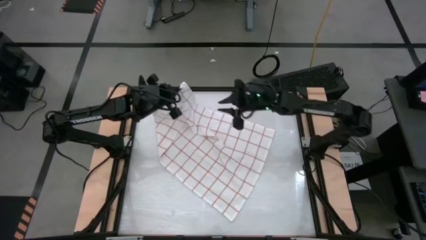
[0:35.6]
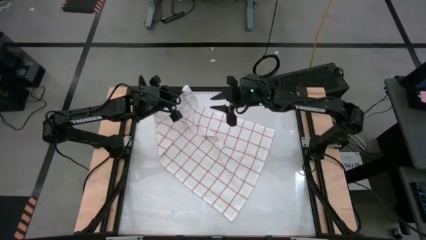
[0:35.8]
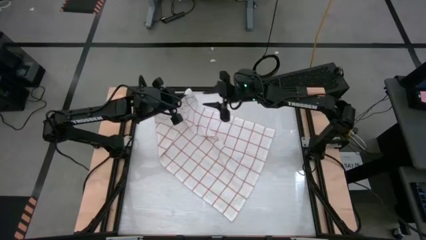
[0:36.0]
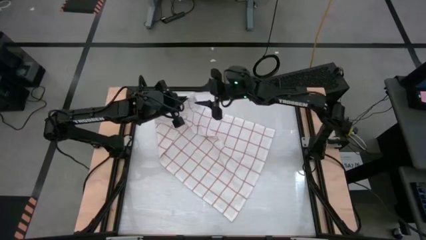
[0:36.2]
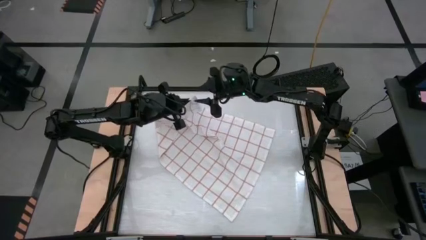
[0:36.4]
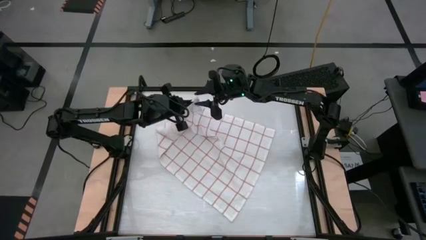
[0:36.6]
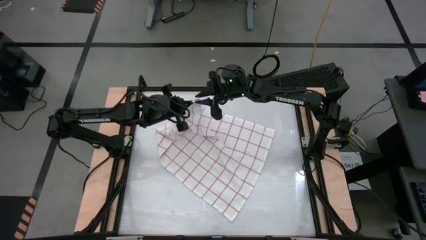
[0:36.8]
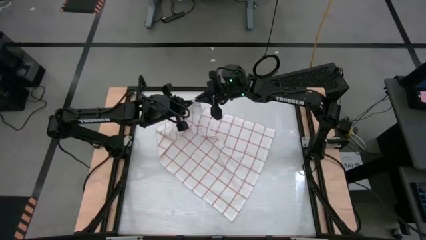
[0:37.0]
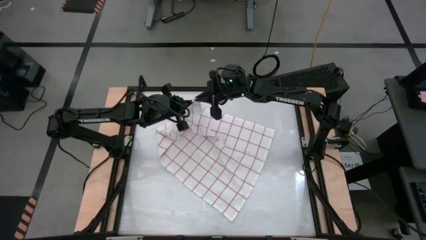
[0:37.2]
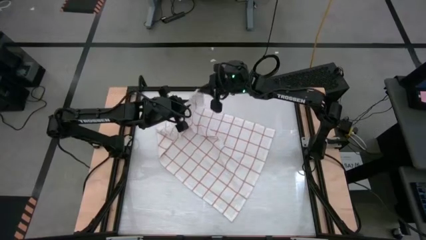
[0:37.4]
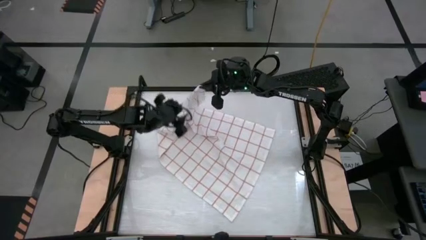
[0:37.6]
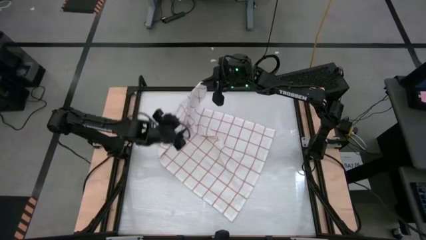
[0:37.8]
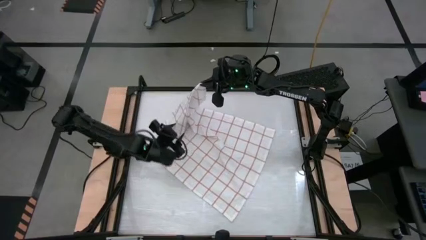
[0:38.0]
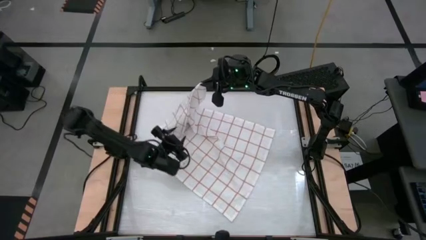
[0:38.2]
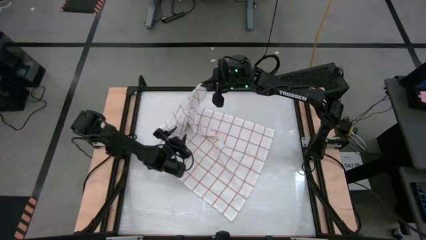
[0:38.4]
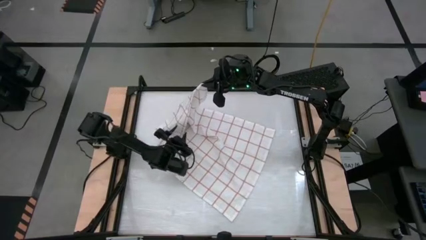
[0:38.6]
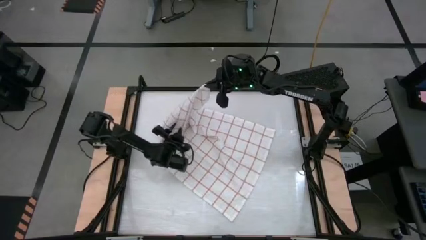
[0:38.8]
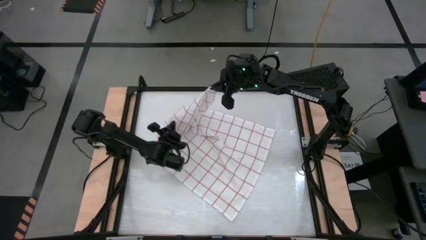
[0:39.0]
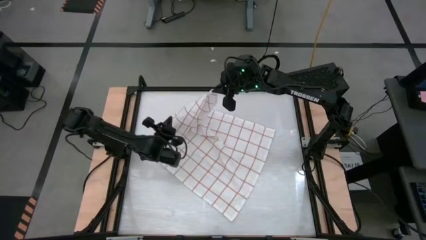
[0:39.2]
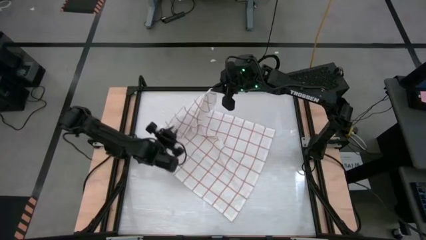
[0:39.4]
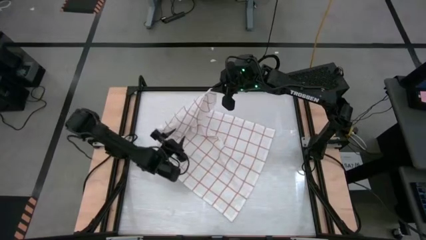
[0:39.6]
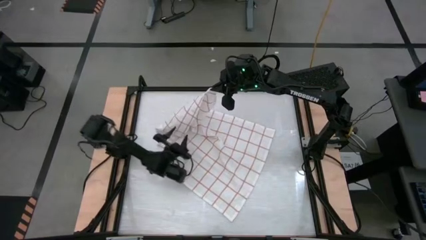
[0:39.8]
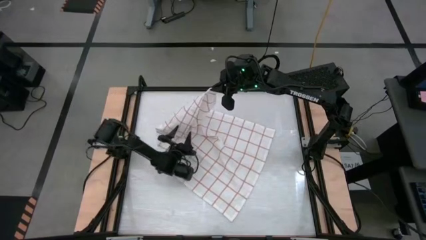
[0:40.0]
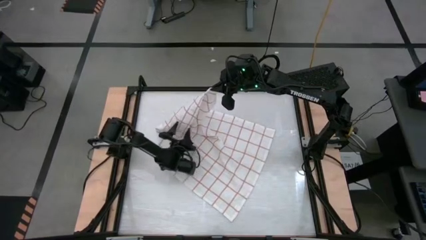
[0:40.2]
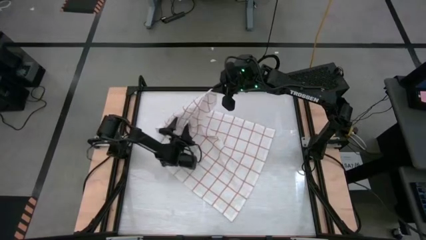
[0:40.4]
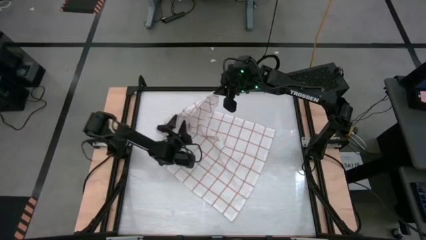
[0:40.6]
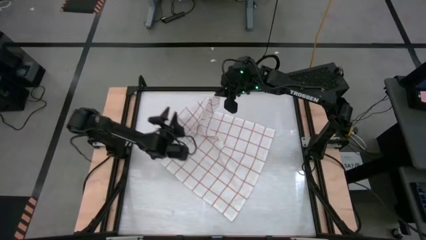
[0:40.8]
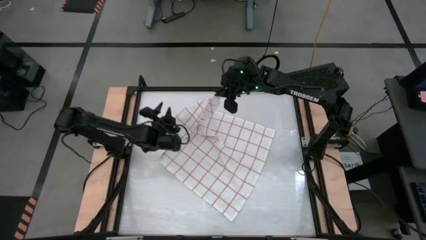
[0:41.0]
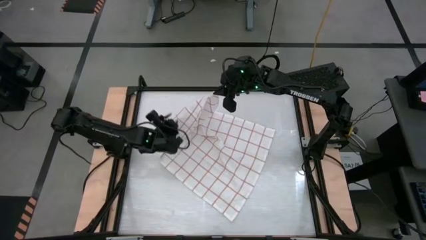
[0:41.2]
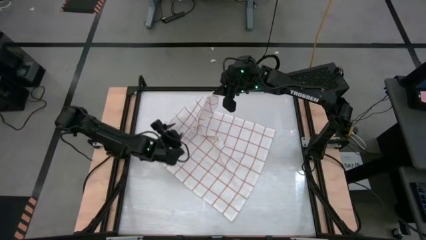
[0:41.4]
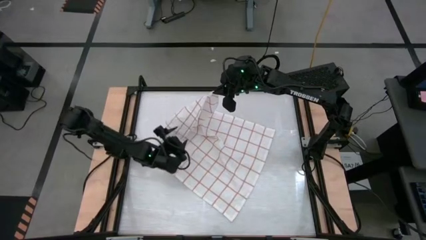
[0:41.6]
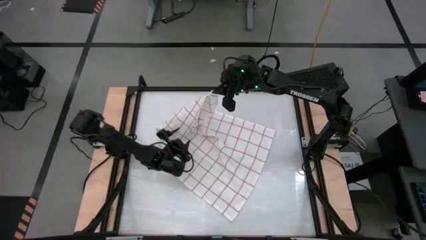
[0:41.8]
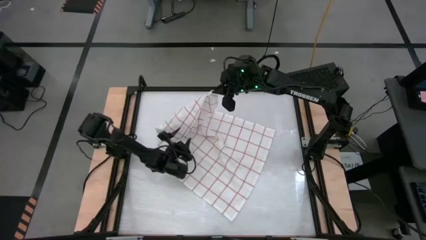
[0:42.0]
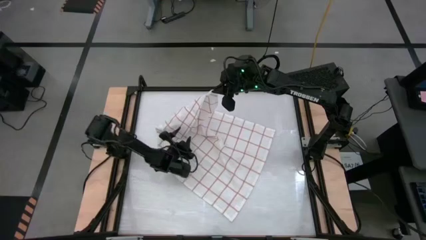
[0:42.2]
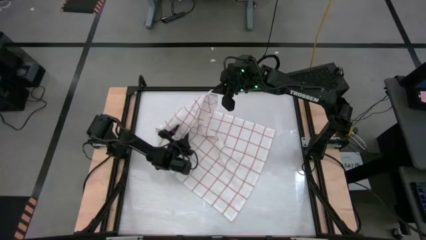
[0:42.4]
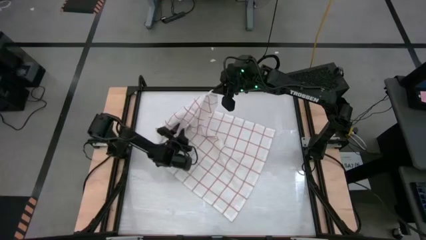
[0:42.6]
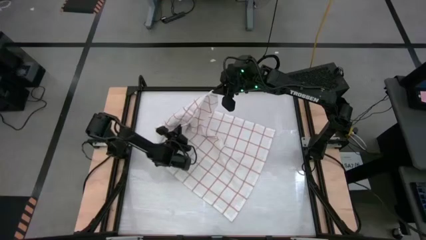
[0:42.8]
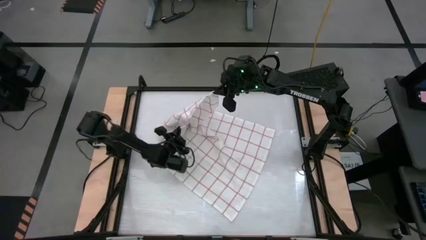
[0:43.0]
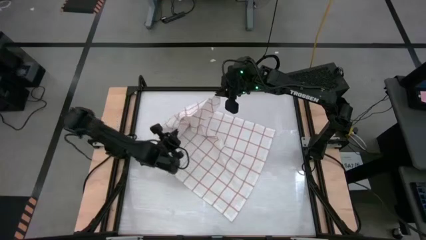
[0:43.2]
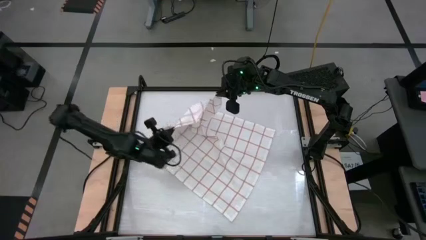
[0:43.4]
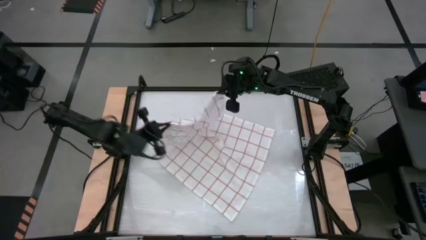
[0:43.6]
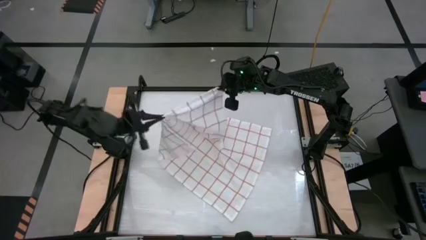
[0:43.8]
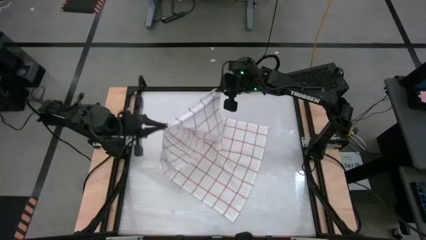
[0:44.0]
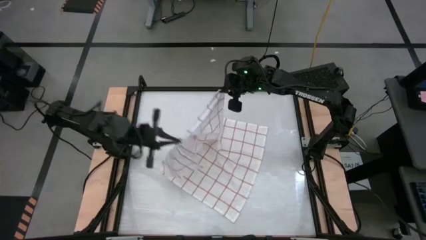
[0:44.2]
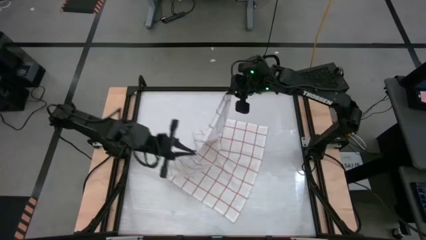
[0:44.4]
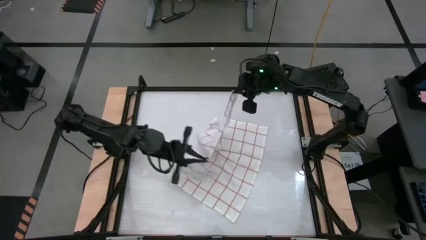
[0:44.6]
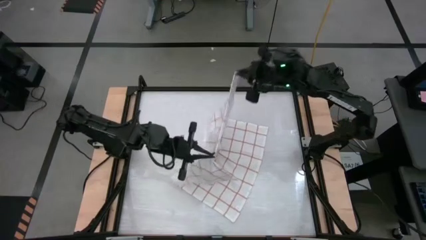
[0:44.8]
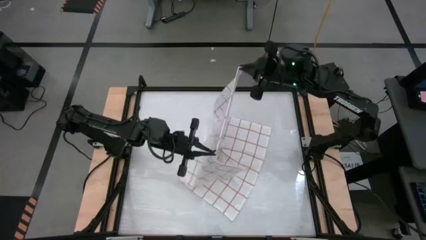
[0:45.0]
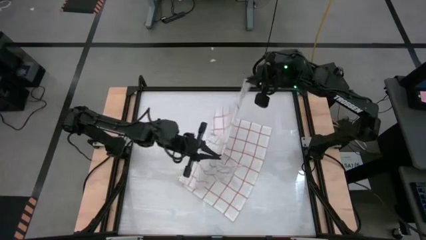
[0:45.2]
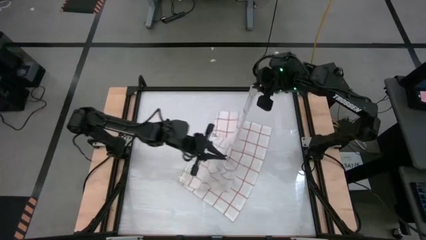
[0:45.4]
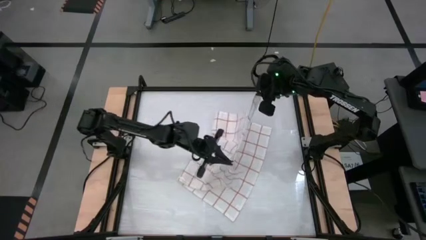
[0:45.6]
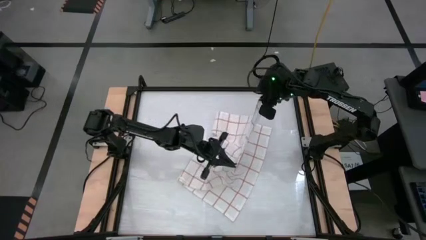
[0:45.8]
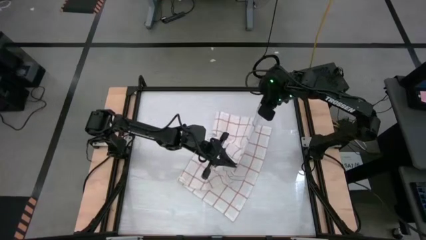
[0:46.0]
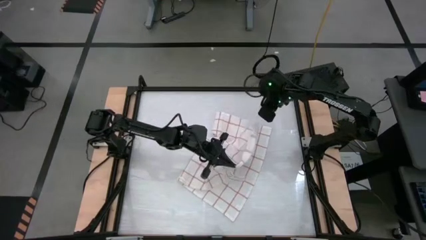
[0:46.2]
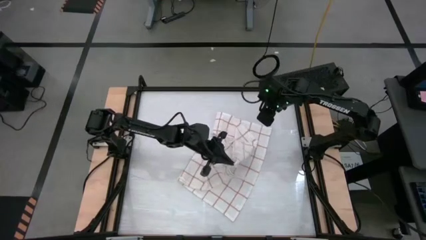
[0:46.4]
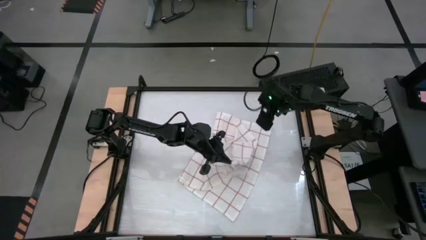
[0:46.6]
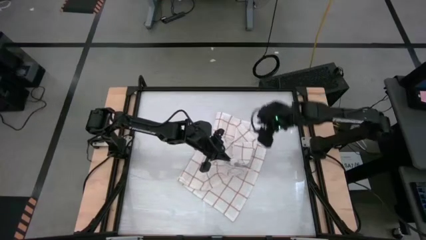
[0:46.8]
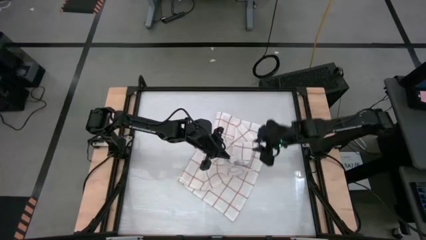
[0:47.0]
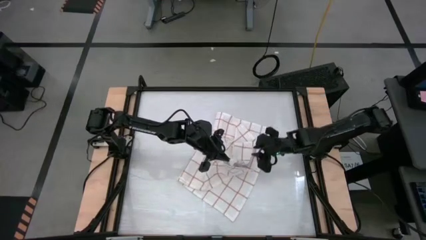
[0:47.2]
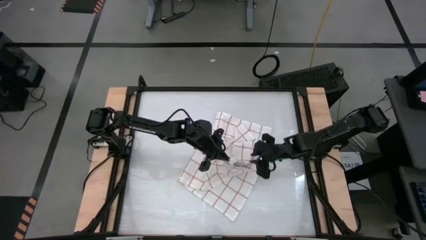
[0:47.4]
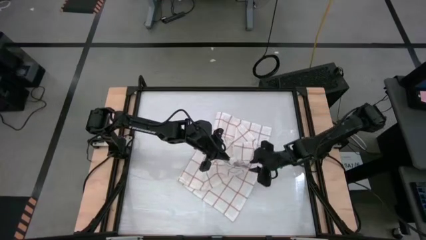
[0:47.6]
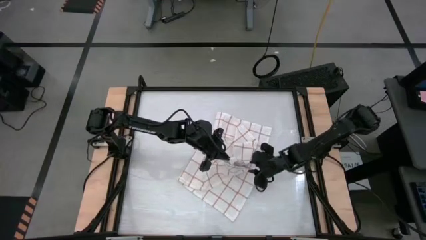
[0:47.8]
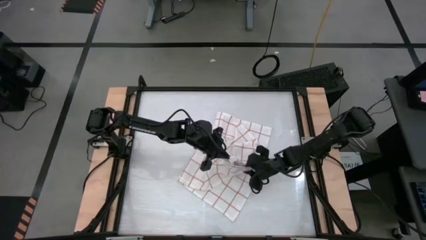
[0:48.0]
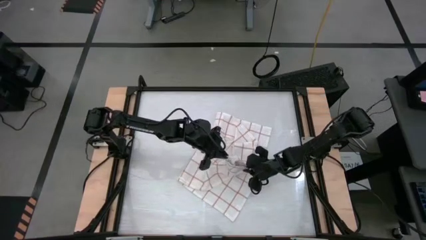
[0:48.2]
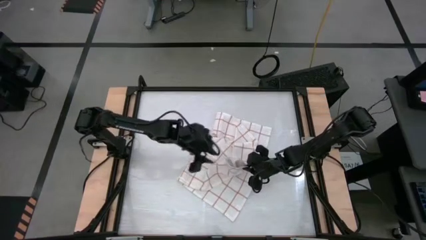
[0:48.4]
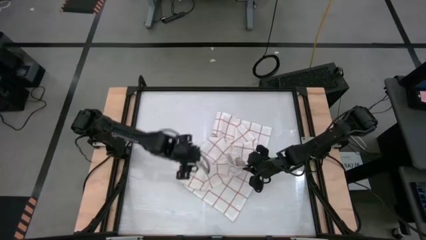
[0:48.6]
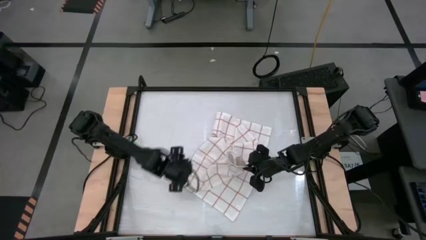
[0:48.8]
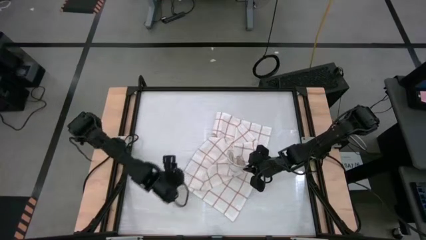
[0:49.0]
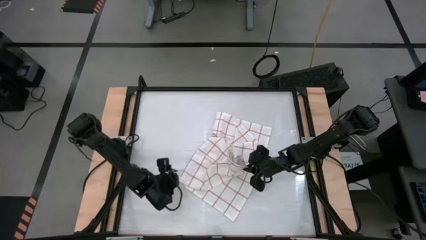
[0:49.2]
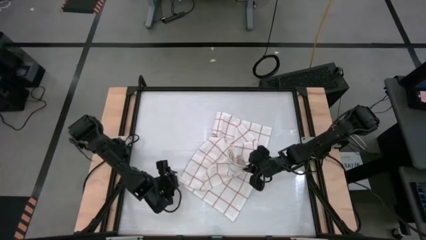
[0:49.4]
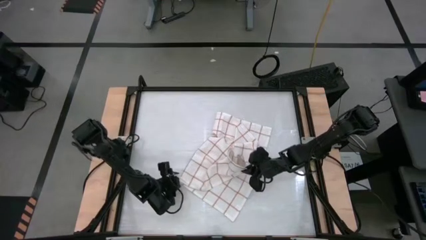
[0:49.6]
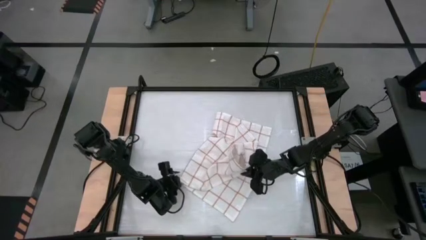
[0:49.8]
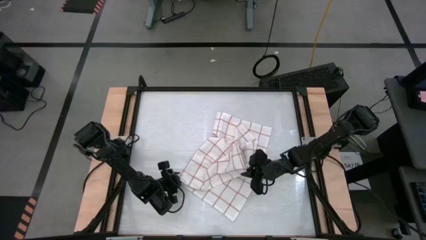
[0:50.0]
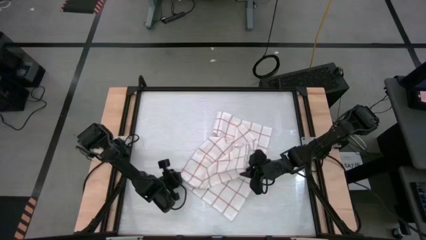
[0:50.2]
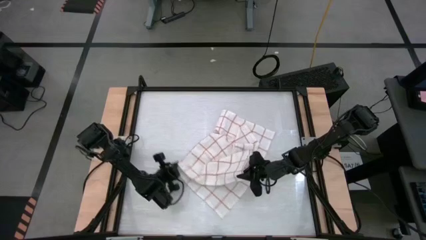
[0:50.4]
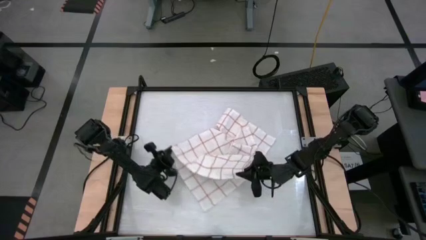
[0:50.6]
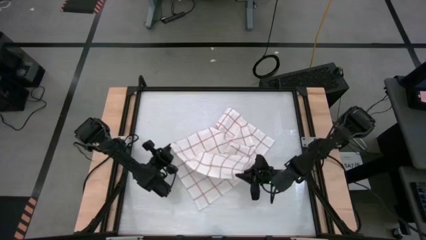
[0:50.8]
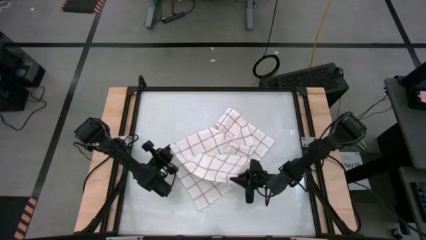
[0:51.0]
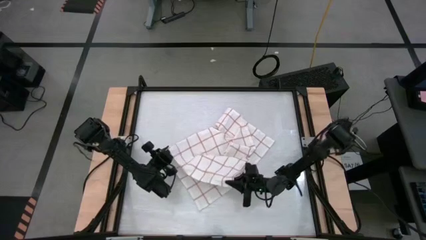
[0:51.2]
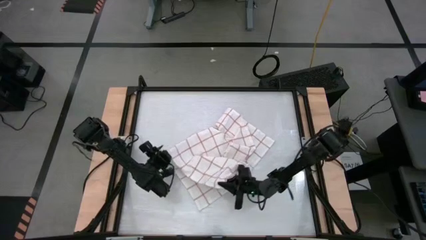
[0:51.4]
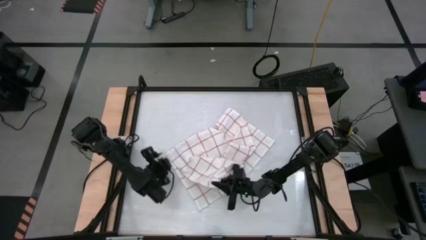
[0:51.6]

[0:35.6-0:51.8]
Task: Roll towel
Fold the white checkered towel
